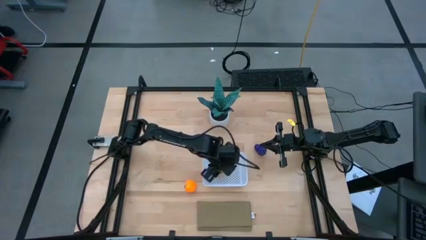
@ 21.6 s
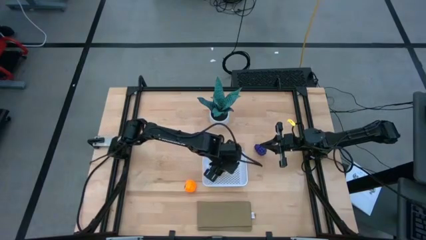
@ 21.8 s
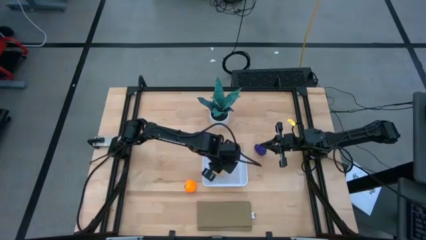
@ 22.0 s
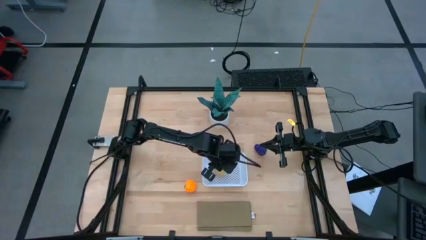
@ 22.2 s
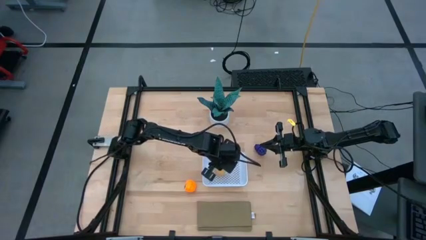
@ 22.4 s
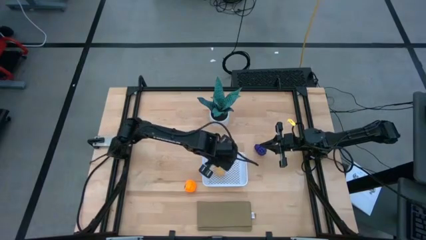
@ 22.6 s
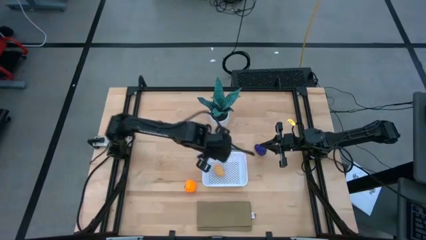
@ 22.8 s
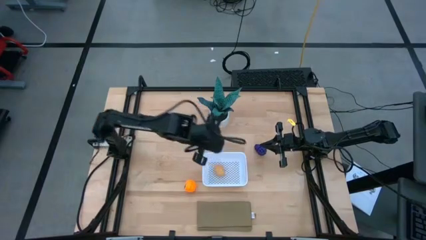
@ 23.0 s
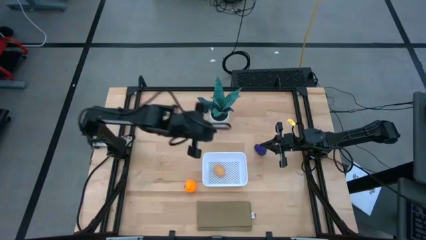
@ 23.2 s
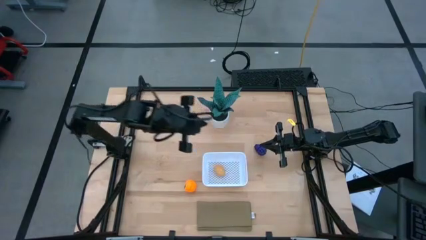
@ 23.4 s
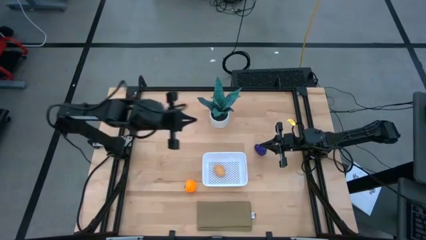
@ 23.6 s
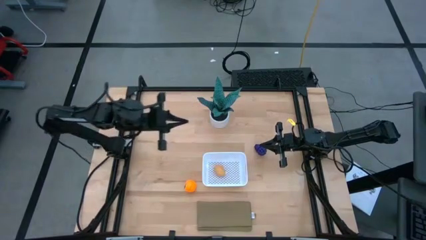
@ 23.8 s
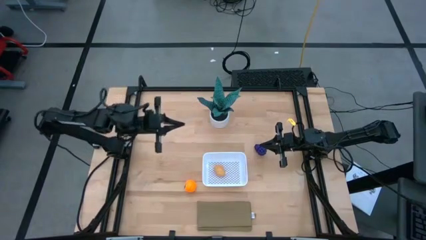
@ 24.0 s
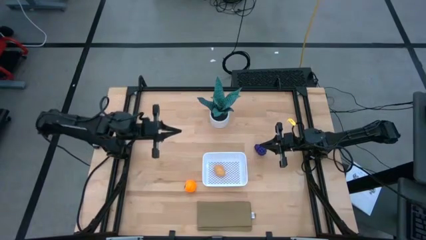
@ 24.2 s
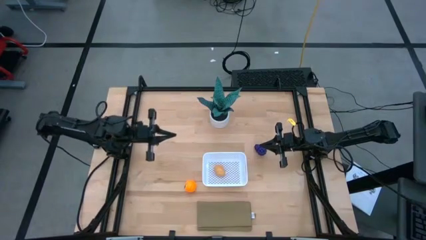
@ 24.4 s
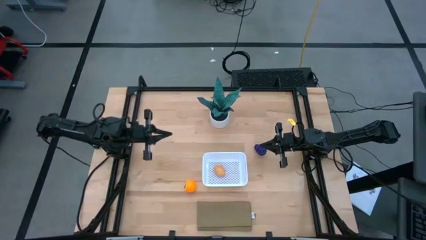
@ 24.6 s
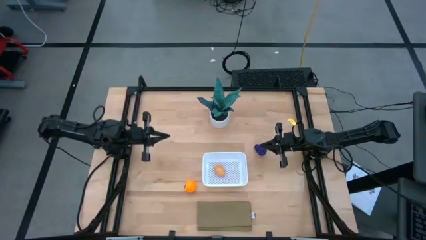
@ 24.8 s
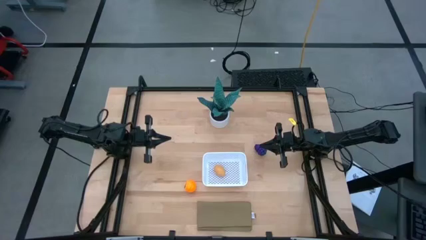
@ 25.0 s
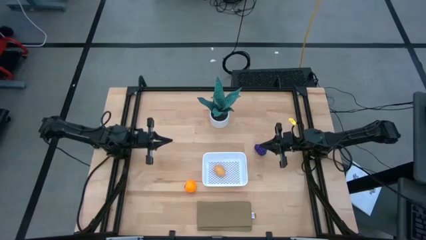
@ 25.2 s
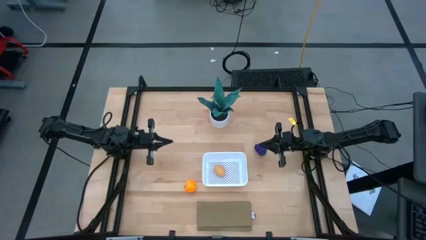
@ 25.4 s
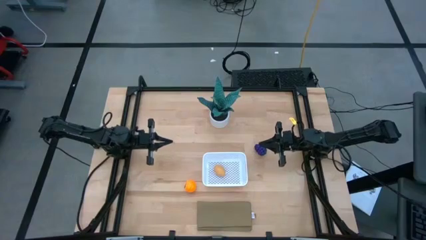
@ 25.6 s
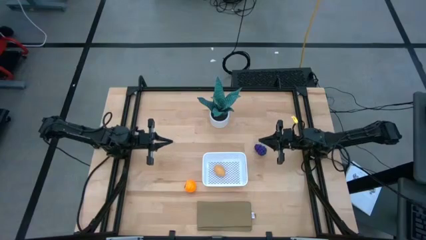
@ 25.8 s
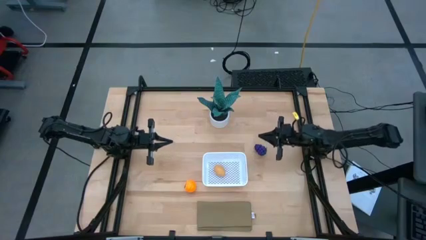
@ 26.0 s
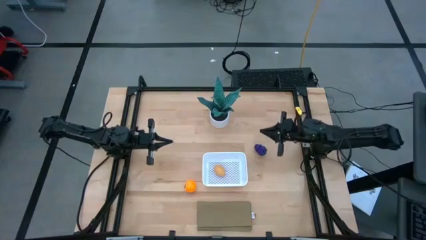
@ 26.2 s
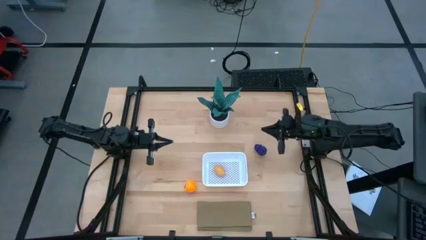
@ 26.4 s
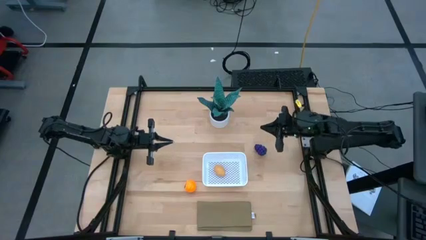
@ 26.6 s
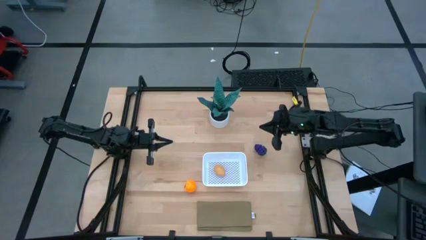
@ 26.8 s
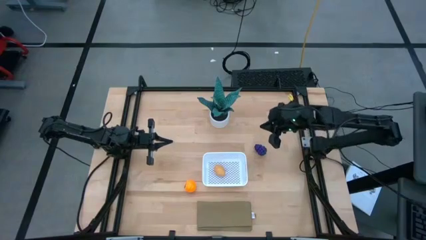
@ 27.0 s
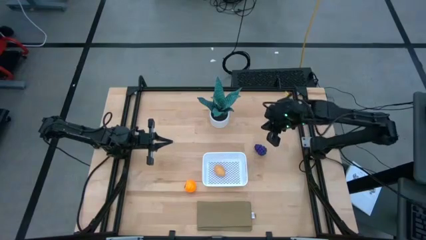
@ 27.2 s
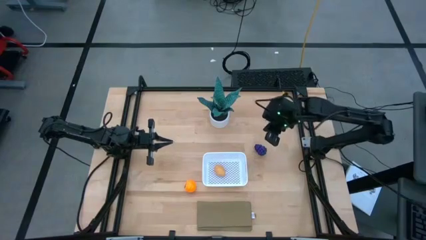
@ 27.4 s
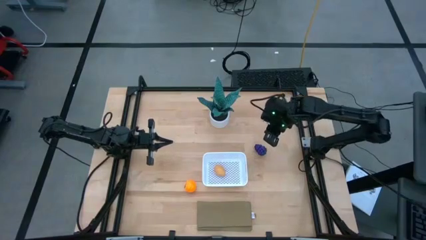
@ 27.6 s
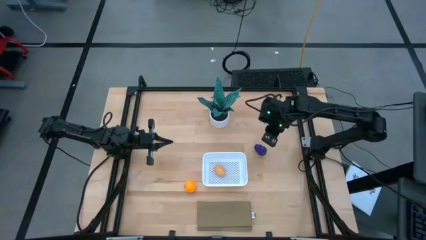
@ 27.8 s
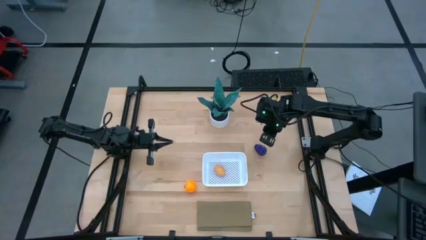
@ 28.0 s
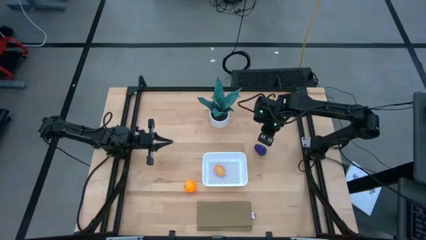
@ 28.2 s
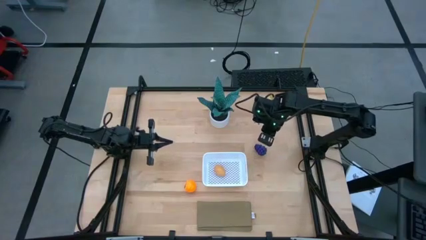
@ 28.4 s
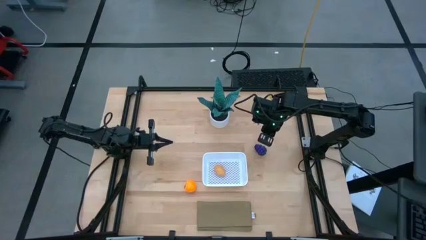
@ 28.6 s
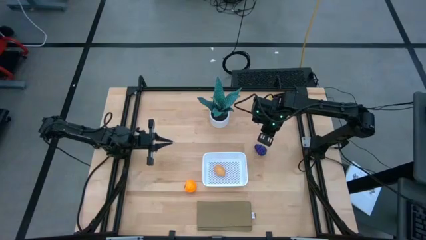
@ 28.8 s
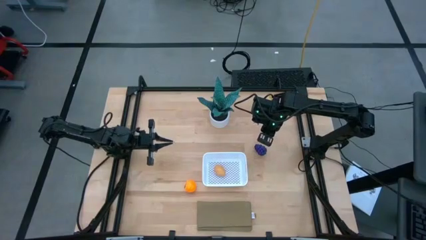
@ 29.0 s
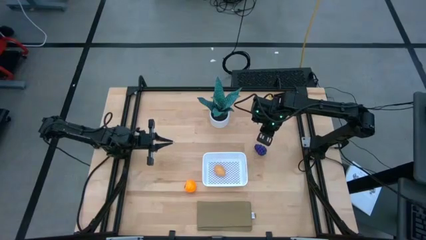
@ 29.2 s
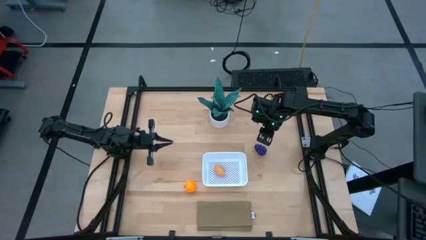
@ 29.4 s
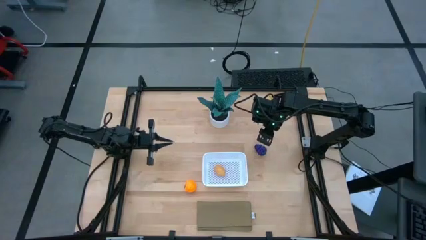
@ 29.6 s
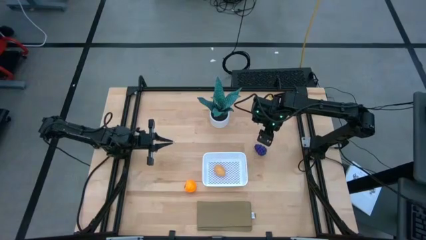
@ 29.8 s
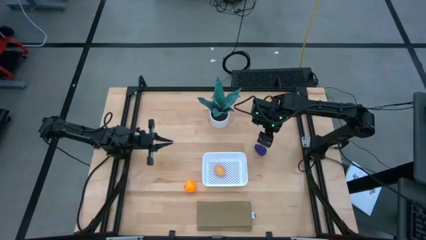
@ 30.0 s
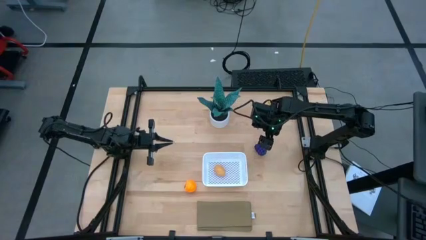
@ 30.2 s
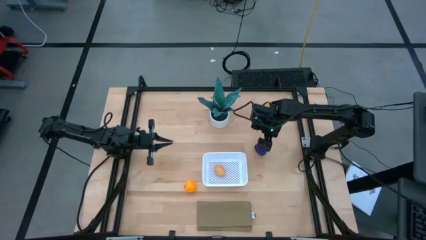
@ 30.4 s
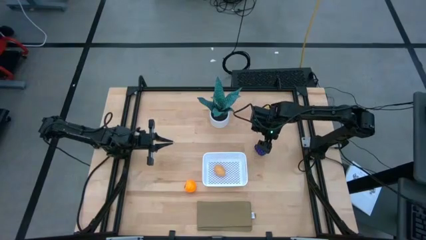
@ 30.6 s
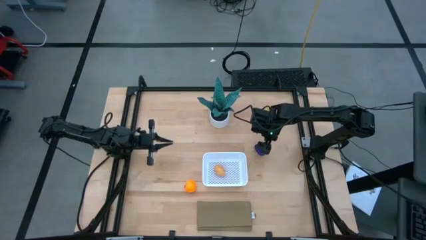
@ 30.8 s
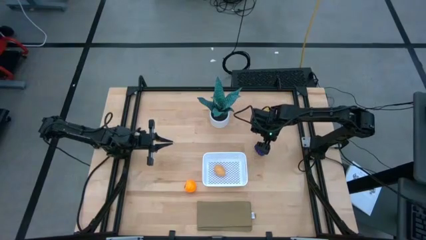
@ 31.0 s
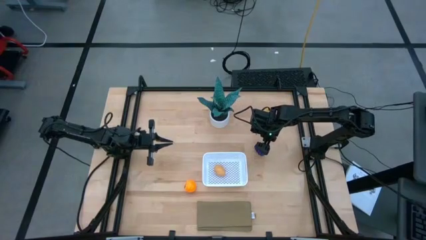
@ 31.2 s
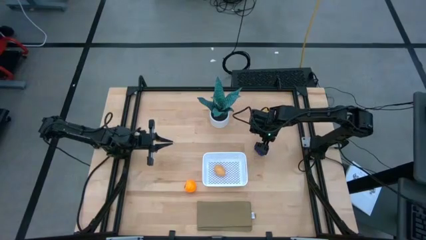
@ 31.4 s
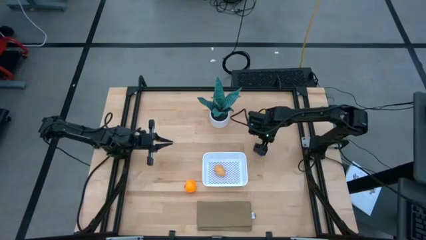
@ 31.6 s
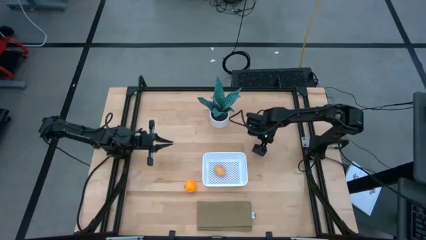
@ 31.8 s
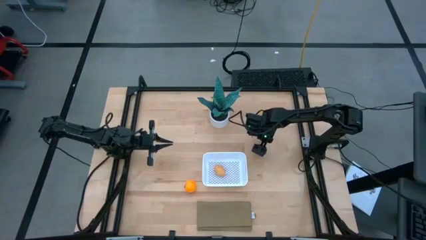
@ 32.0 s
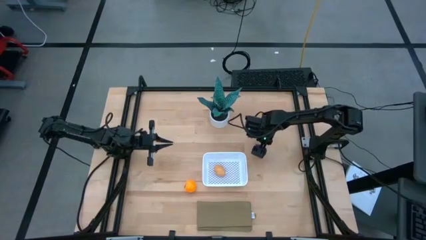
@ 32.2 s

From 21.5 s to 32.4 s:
Task: Pick and placing Produce into tupperware
Put the violet grapes into the white basket
